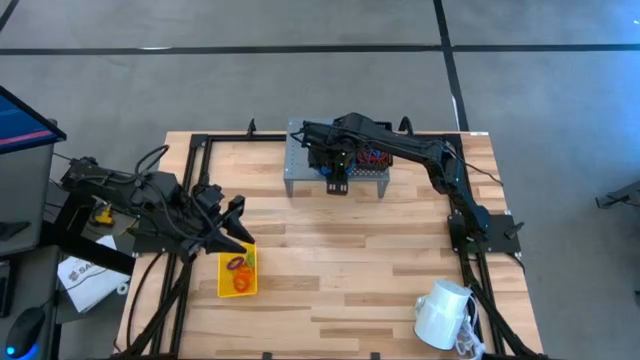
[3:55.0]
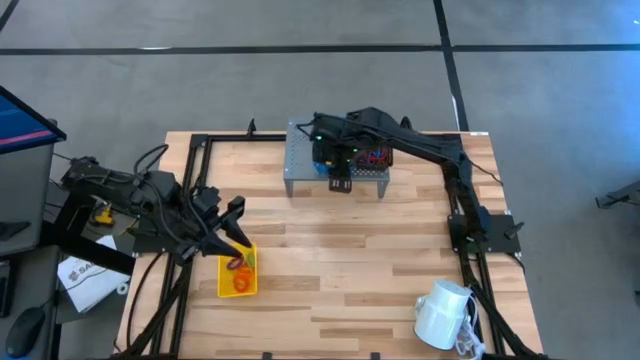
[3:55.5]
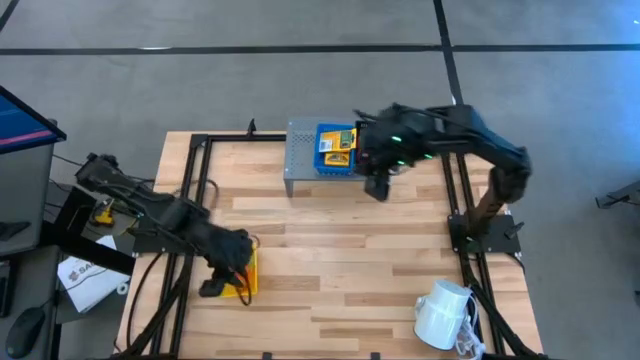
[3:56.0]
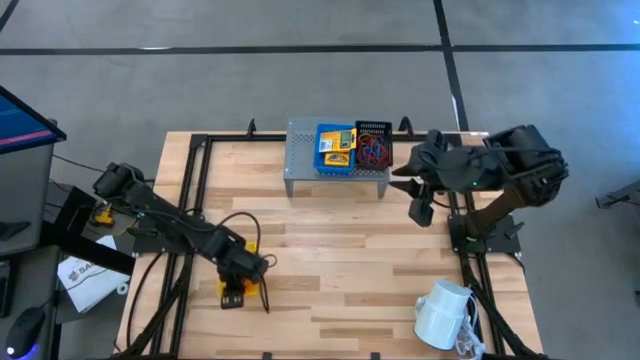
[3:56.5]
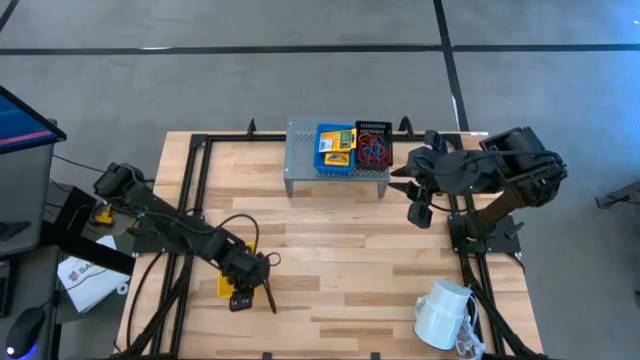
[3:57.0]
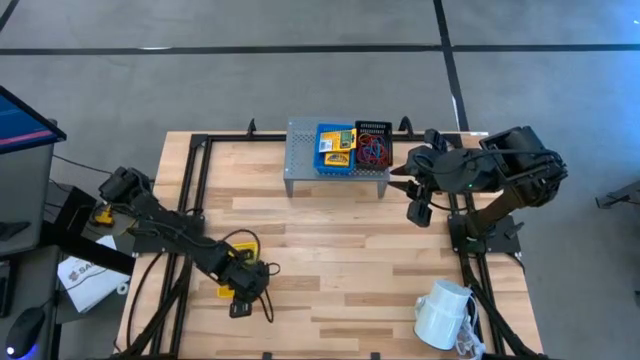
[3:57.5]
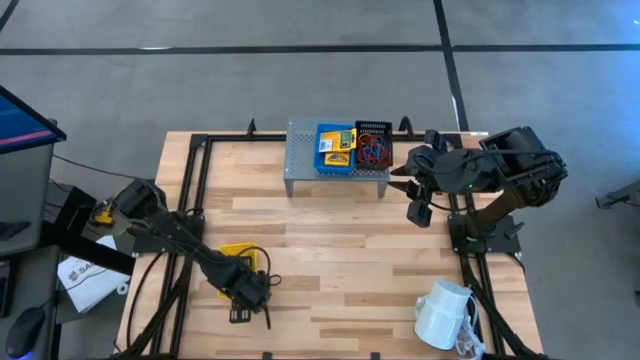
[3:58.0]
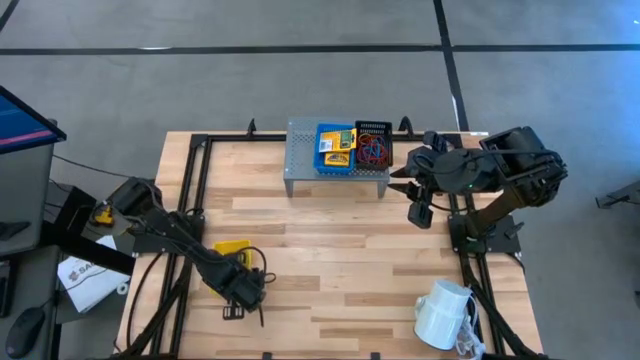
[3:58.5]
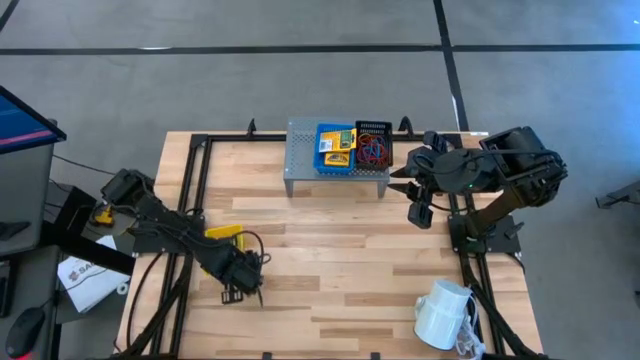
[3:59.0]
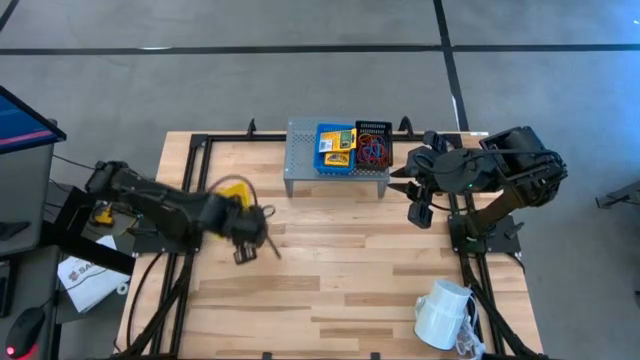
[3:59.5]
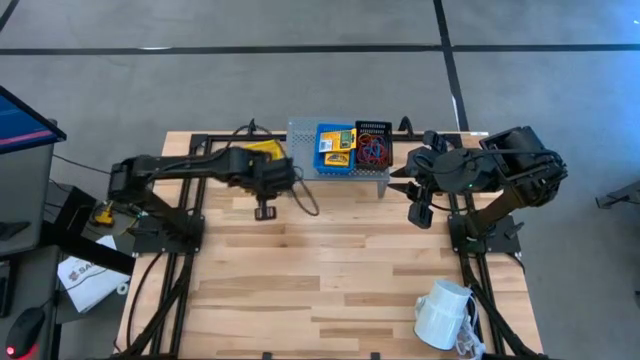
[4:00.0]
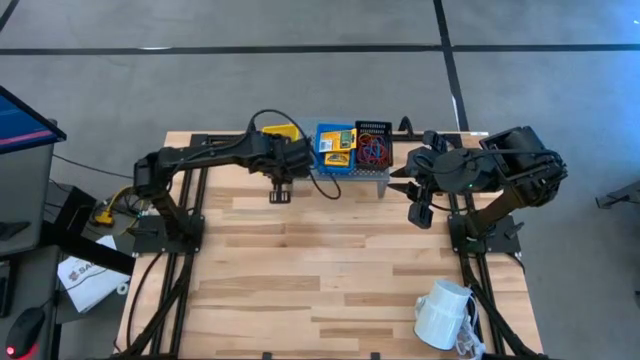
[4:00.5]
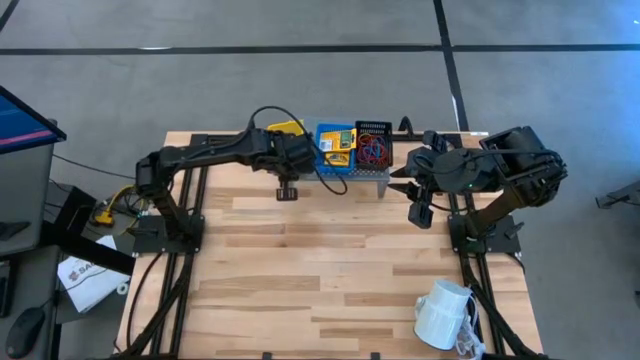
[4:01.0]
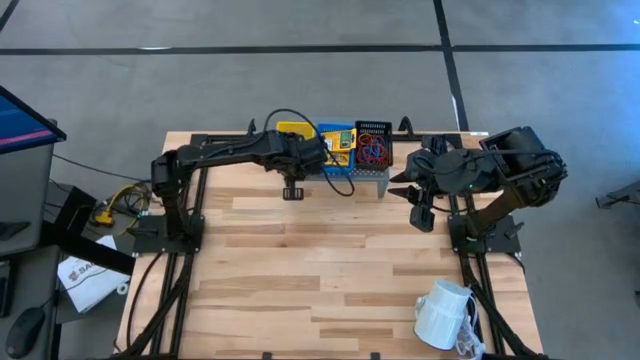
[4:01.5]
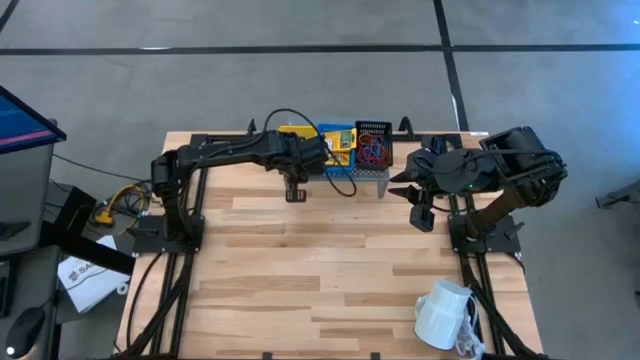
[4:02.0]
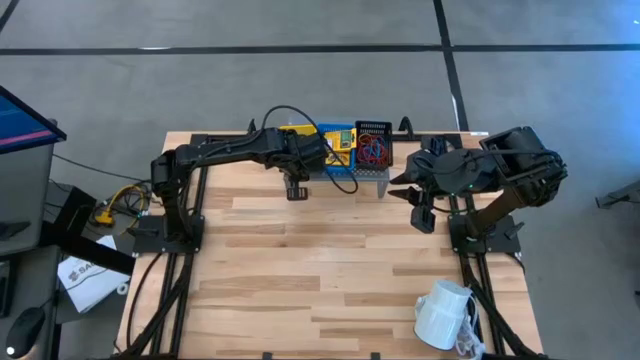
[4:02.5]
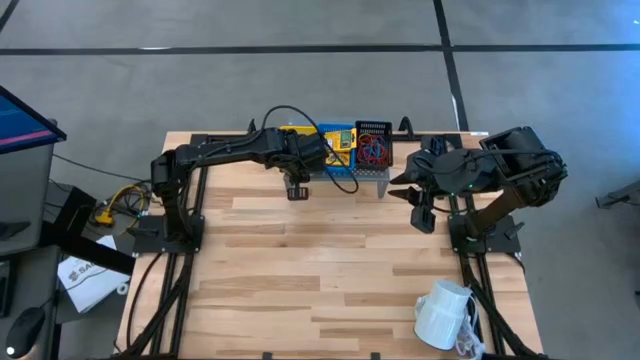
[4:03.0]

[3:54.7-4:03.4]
Task: Pick & Place Office Desk Supplies
Put the yellow bin filled with spring keychains on the shelf

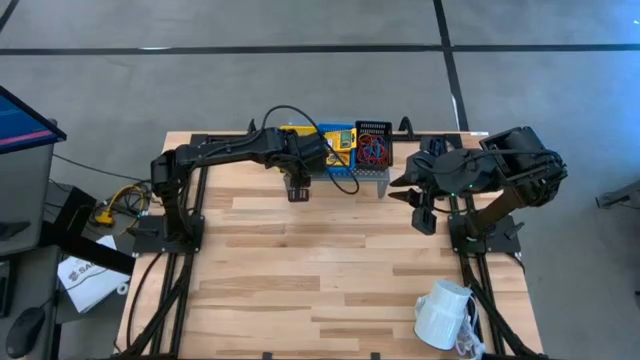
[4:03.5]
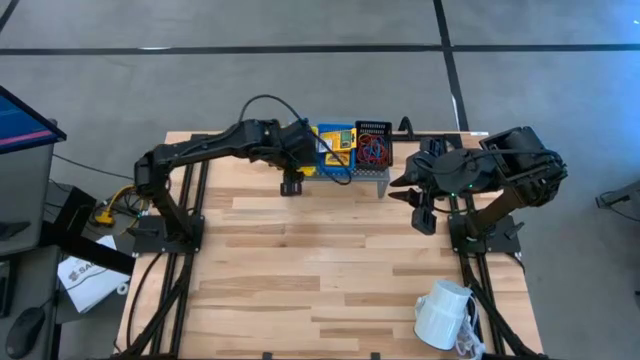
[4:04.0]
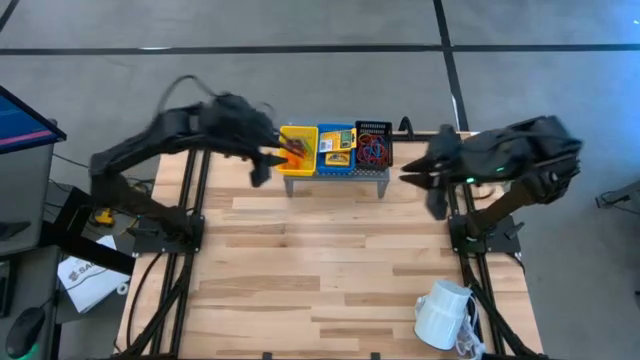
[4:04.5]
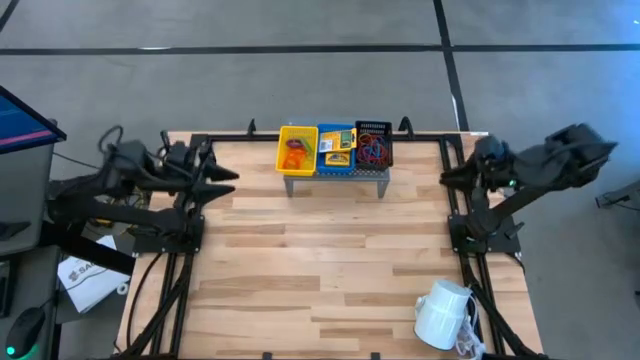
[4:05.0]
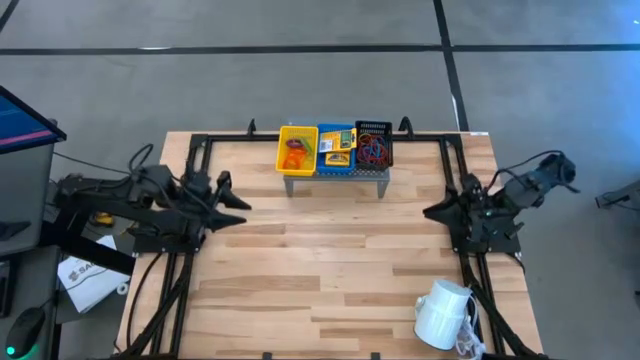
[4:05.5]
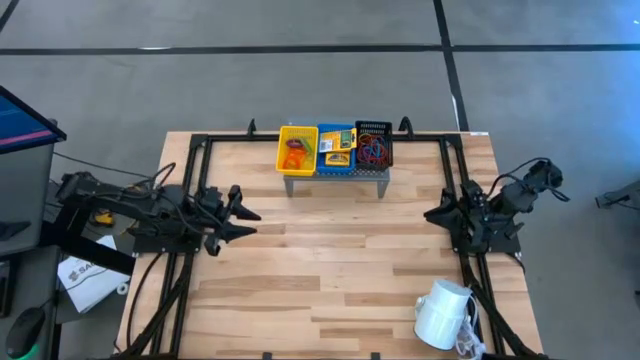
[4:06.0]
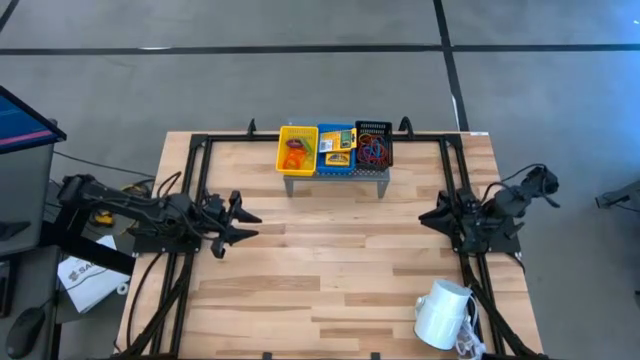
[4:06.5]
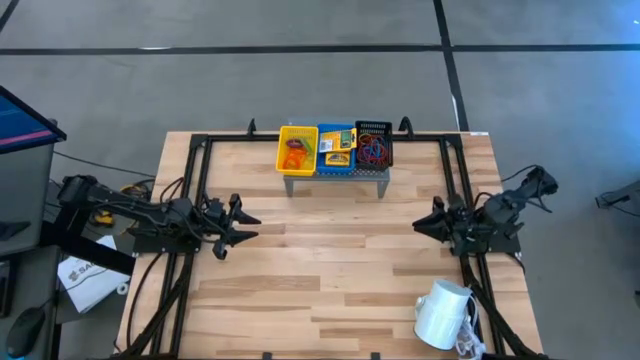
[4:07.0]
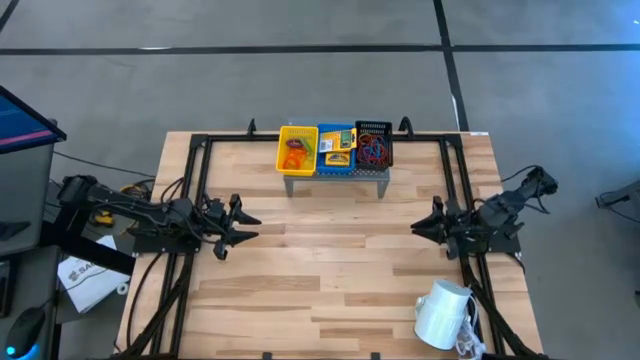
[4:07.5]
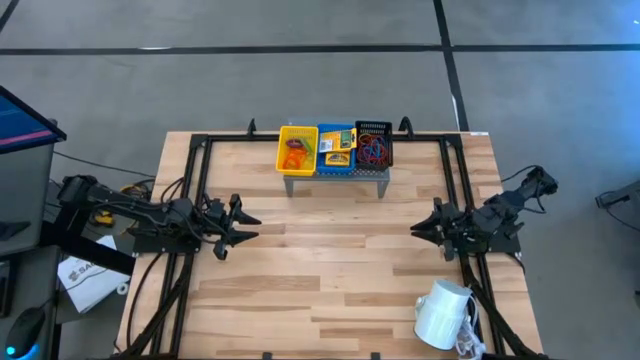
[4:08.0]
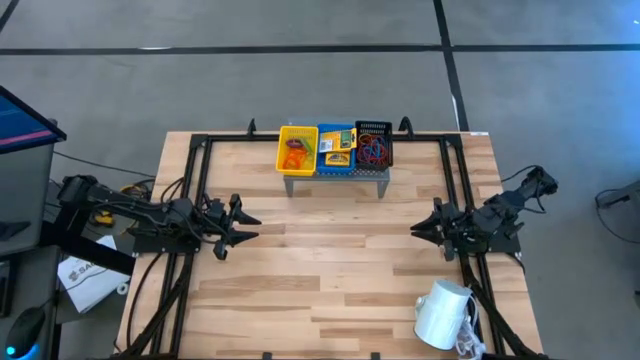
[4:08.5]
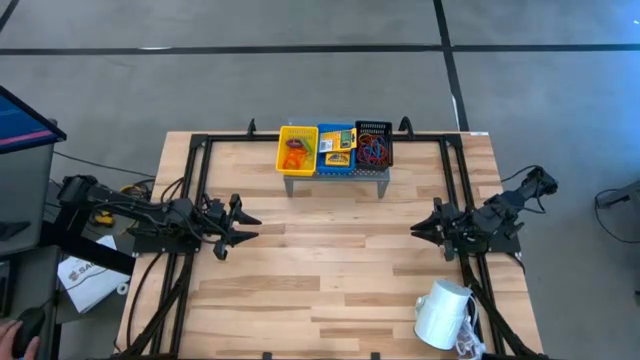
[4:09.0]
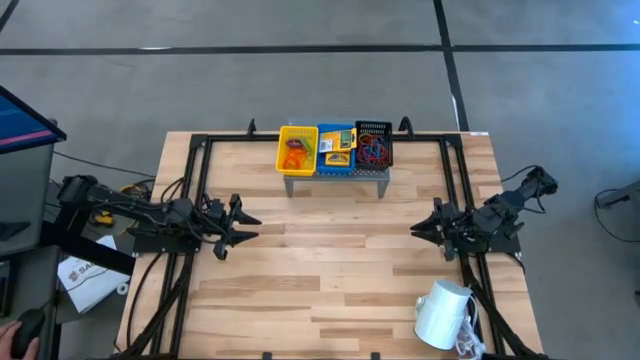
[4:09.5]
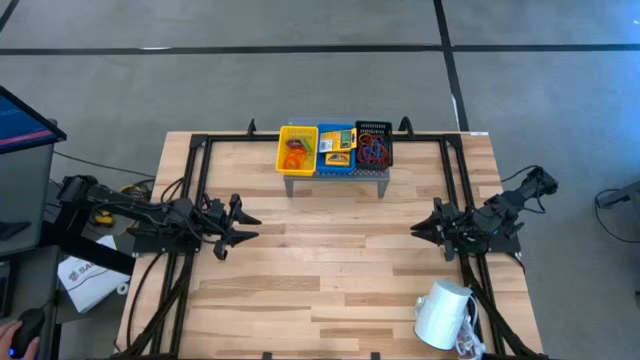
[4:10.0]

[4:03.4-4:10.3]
Return to Home Position

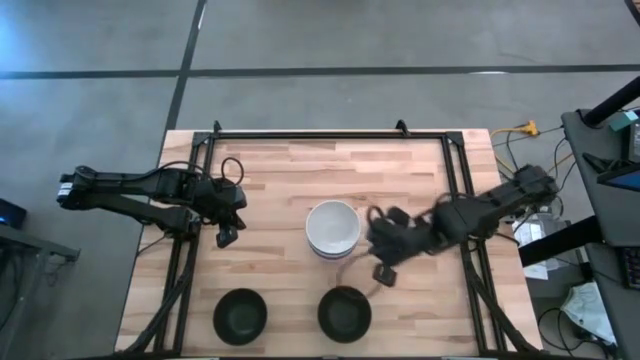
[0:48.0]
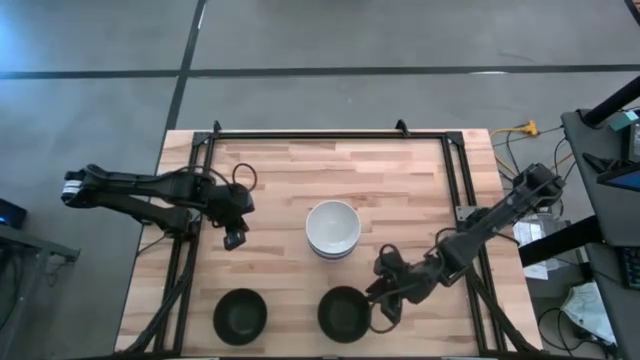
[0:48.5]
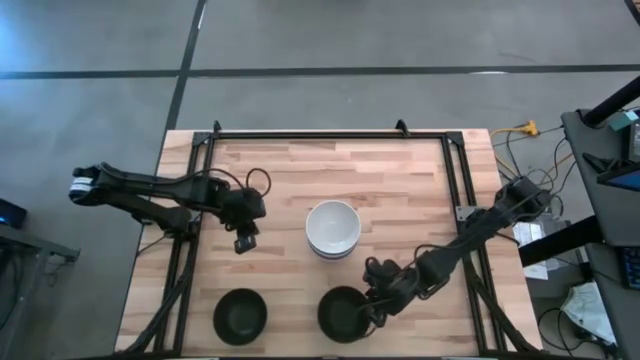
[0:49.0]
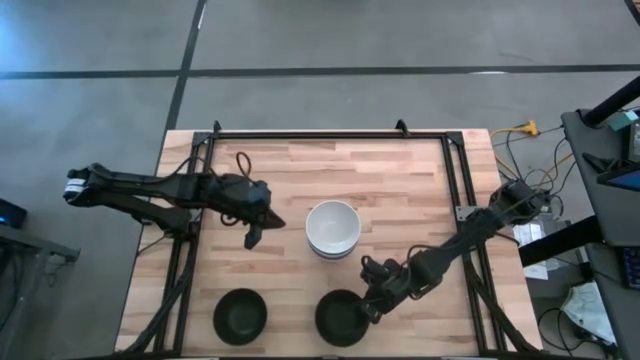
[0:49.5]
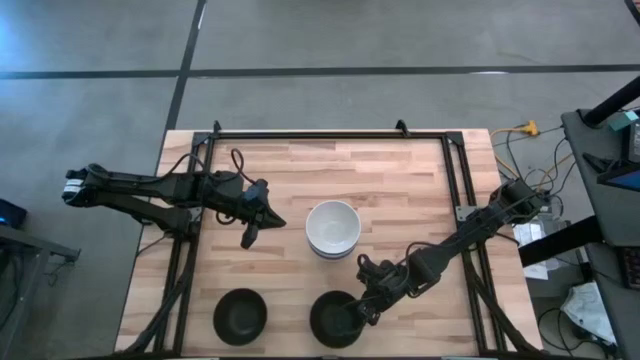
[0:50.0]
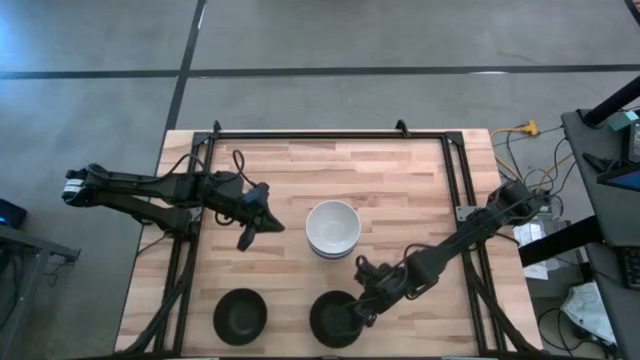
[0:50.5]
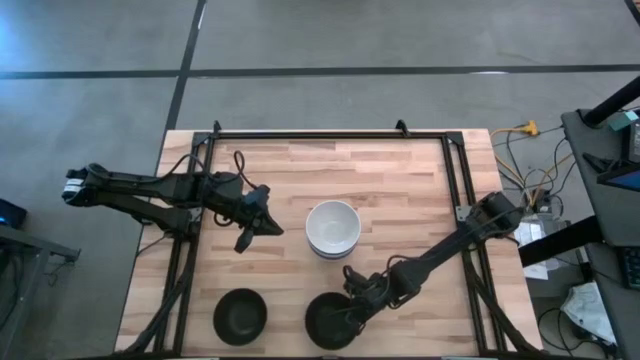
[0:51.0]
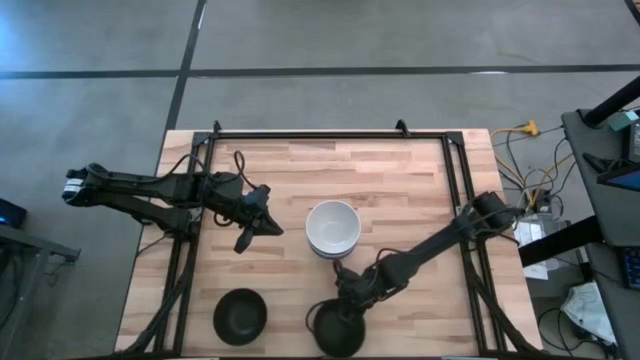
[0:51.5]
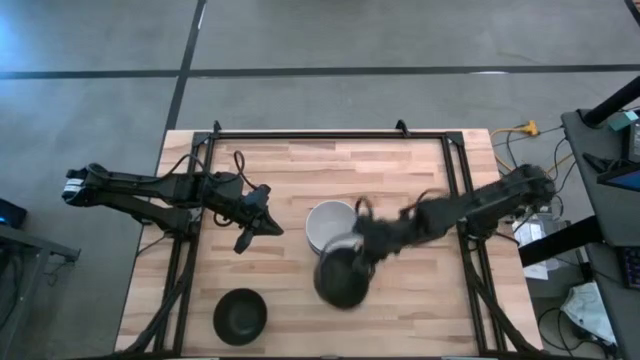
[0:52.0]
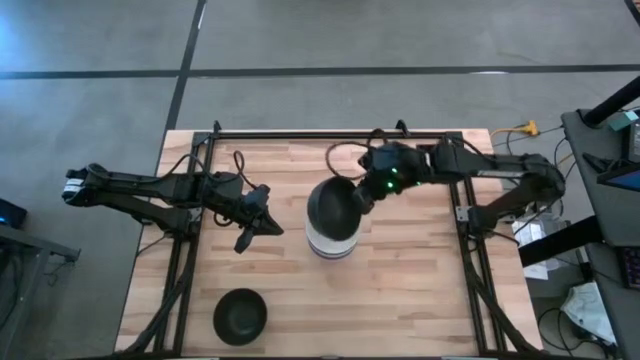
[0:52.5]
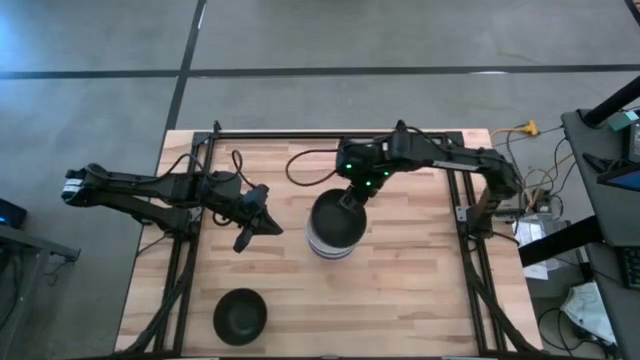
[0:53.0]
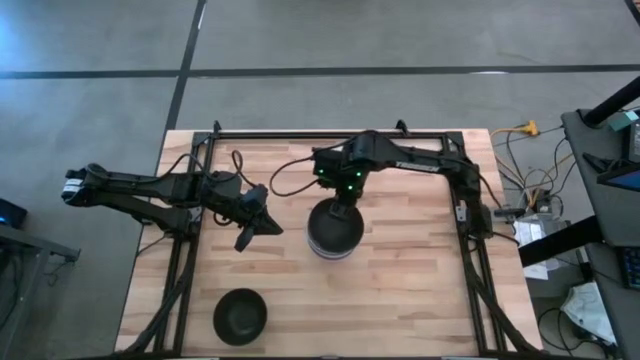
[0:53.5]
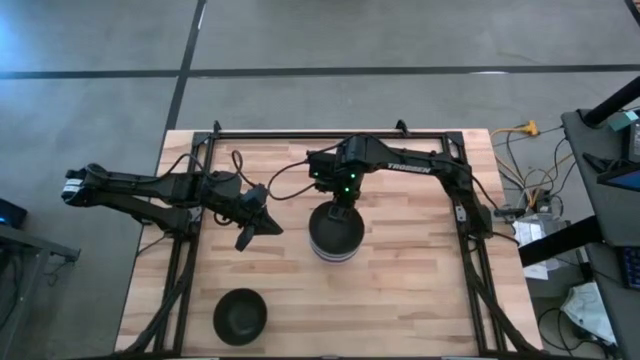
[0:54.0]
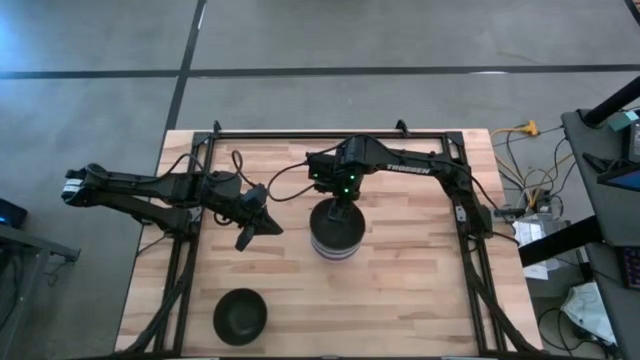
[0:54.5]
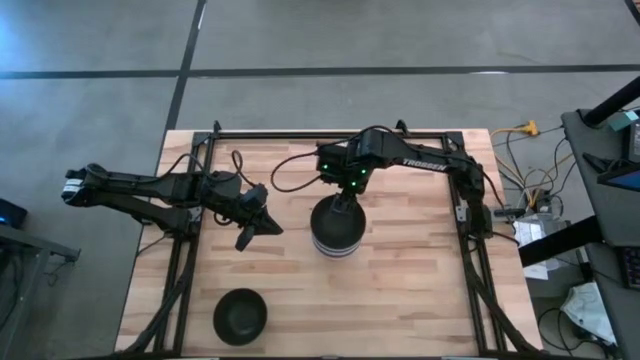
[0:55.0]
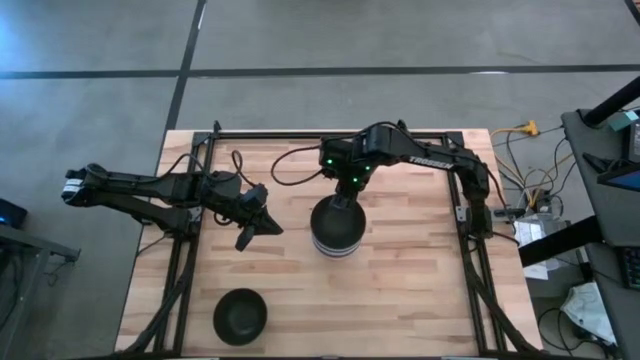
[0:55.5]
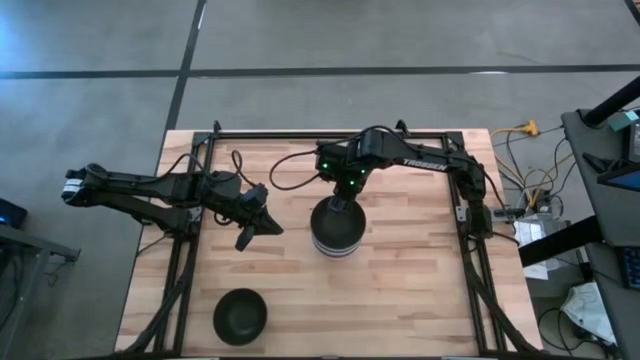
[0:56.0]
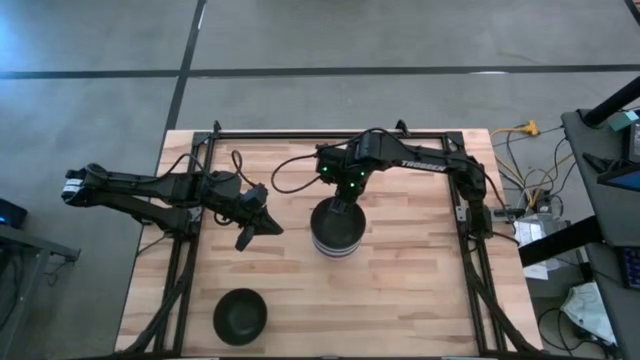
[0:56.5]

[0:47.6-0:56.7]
Task: Nest bowls inside each other
Stack the black bowl on the white bowl
